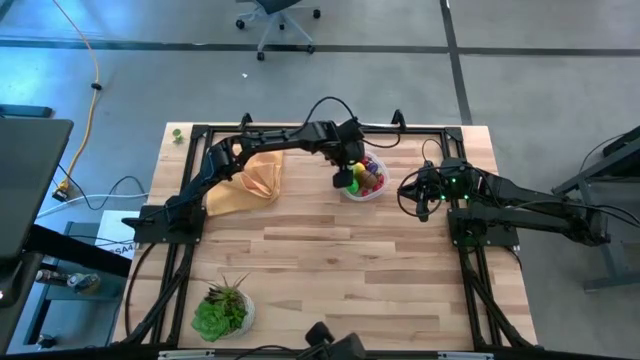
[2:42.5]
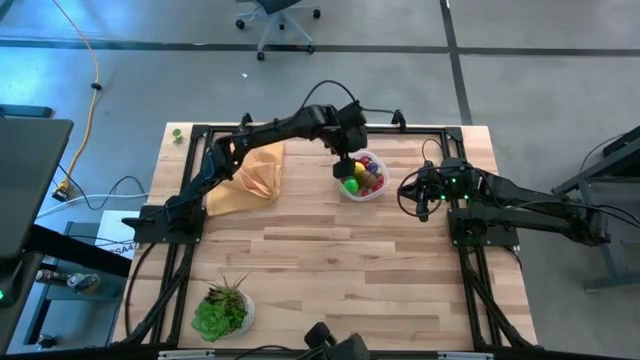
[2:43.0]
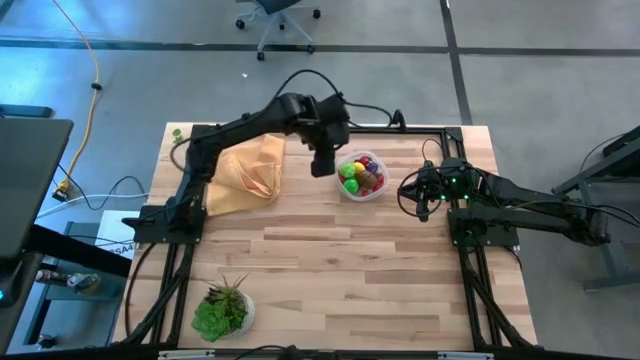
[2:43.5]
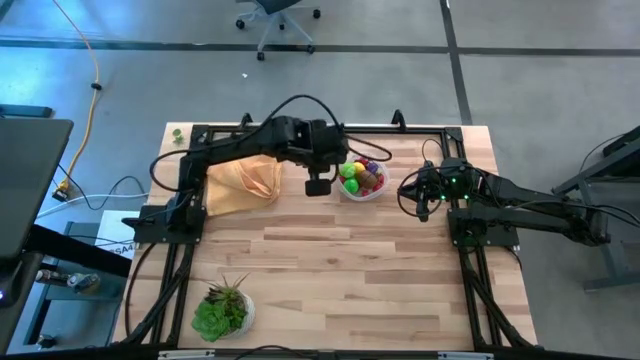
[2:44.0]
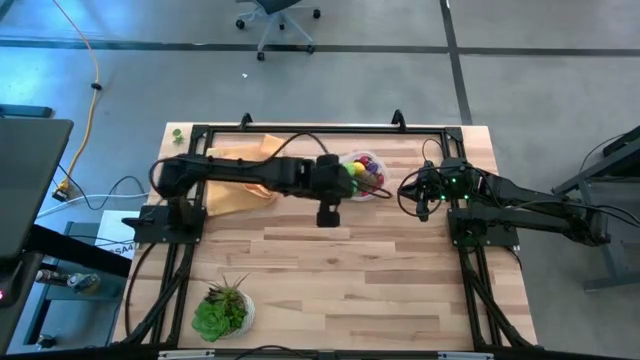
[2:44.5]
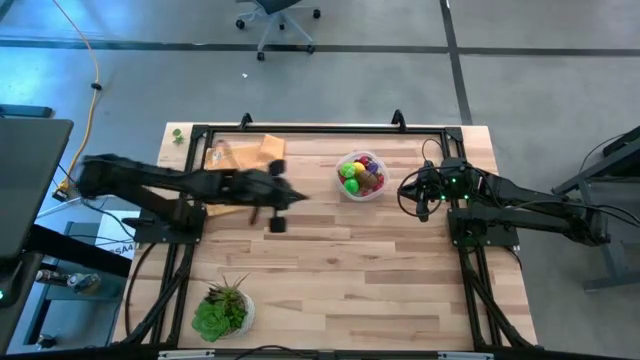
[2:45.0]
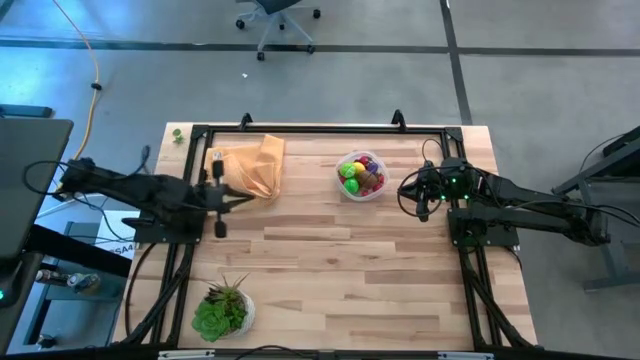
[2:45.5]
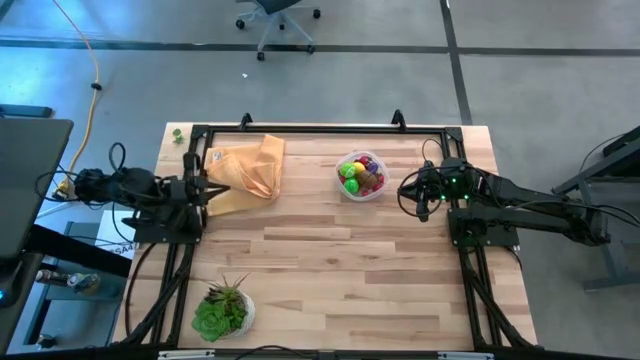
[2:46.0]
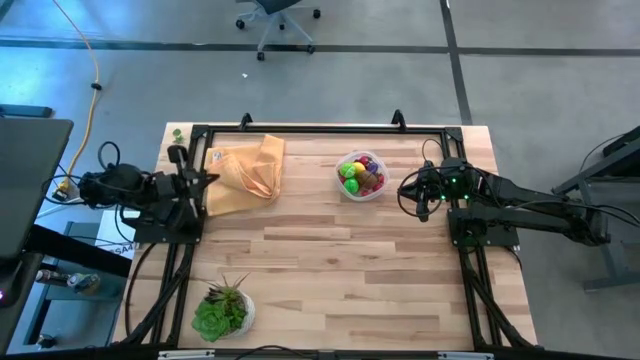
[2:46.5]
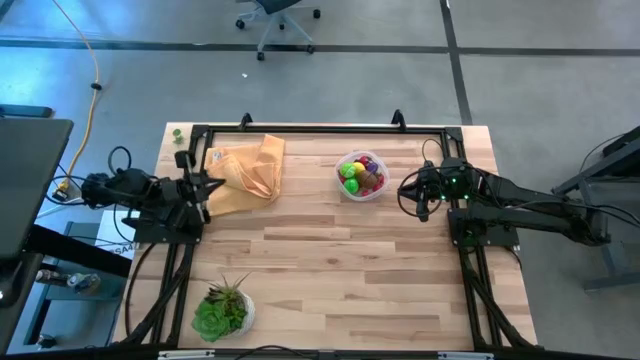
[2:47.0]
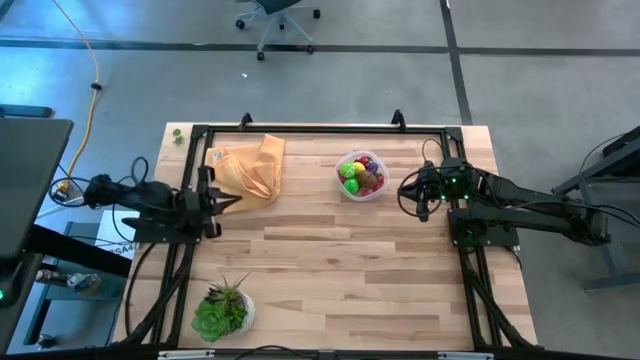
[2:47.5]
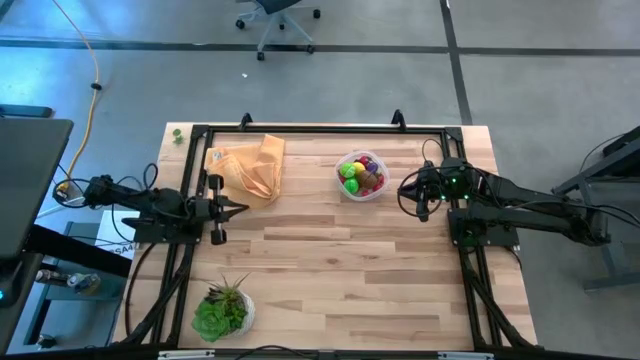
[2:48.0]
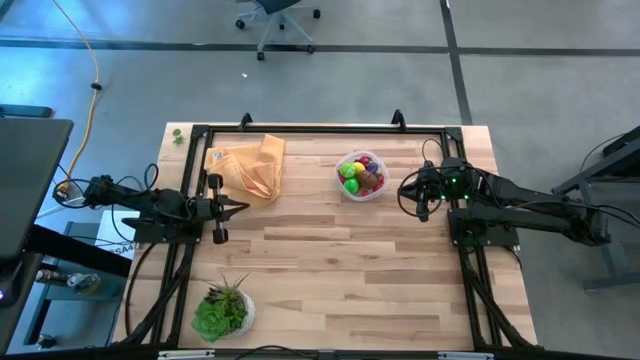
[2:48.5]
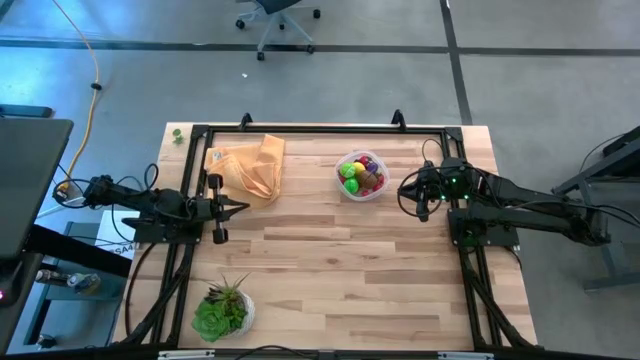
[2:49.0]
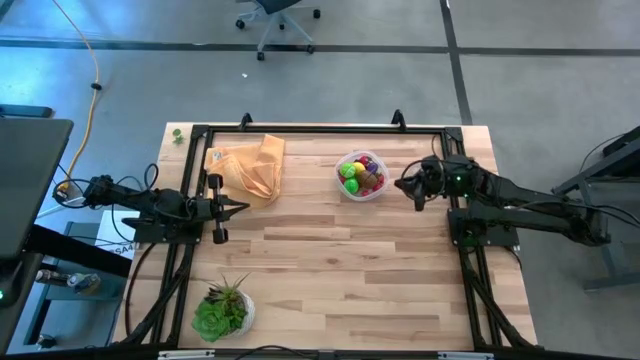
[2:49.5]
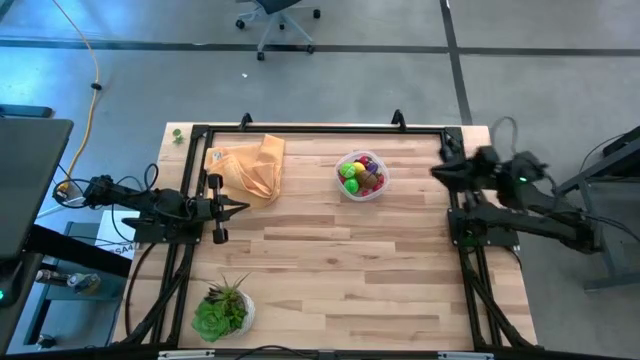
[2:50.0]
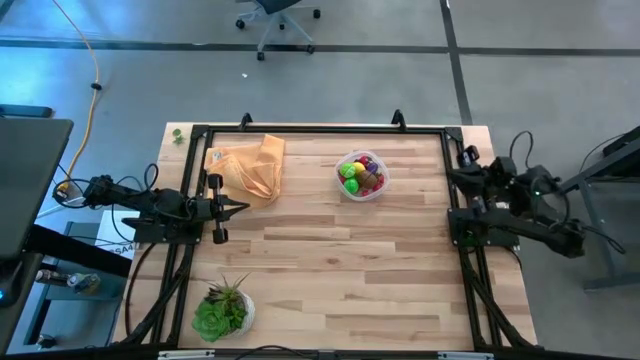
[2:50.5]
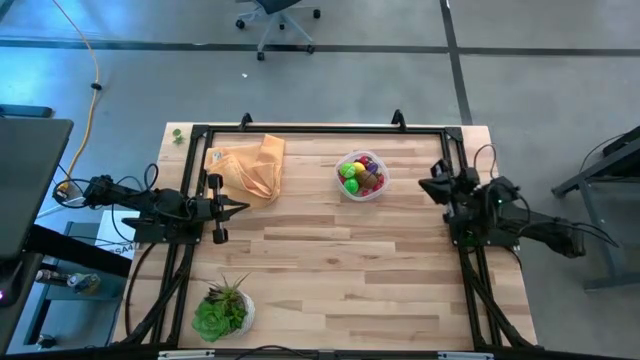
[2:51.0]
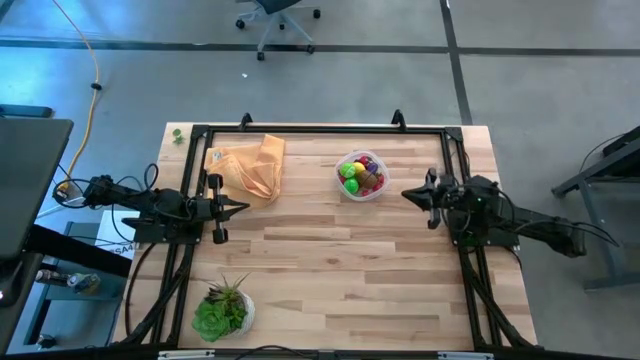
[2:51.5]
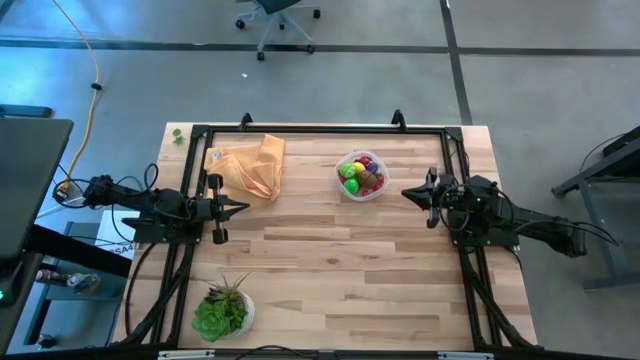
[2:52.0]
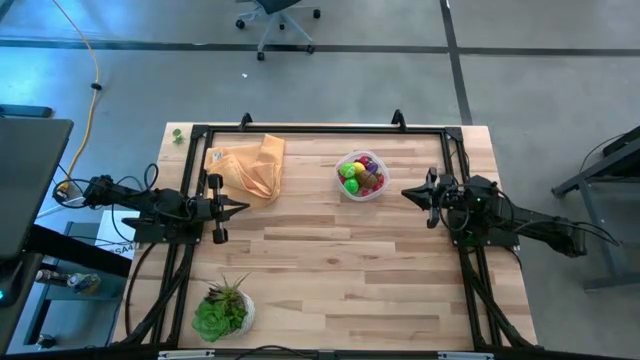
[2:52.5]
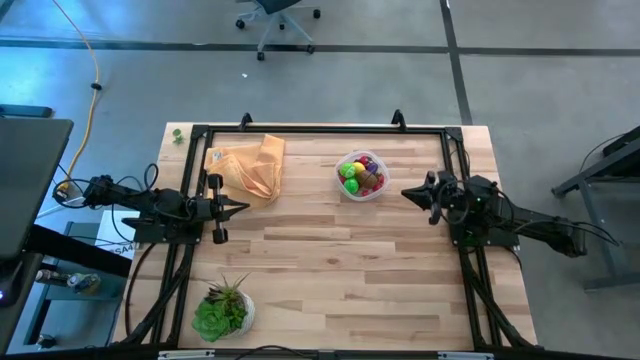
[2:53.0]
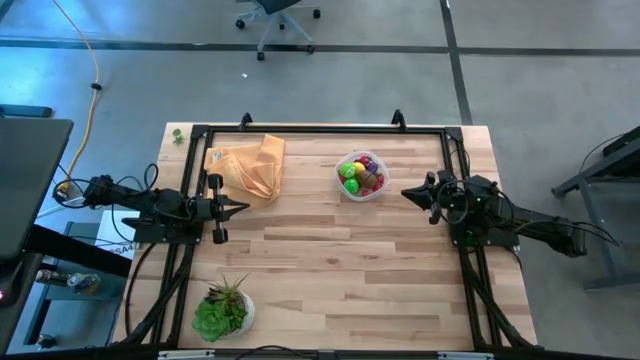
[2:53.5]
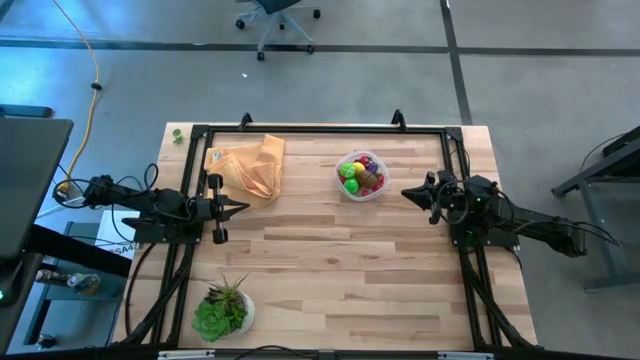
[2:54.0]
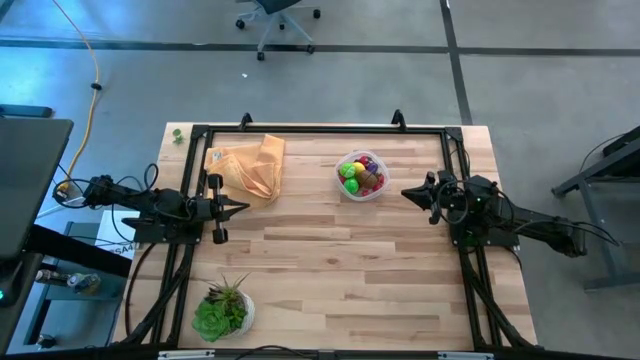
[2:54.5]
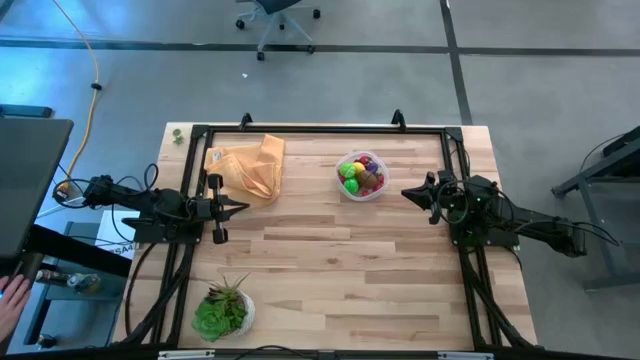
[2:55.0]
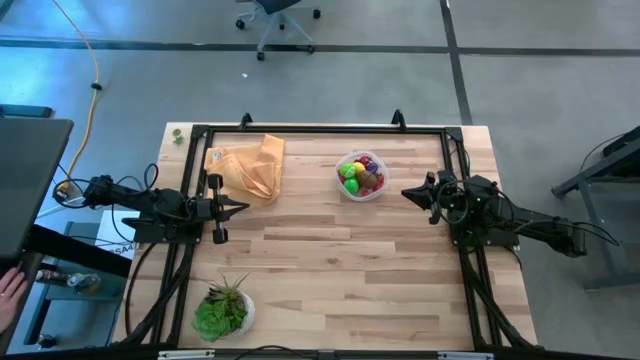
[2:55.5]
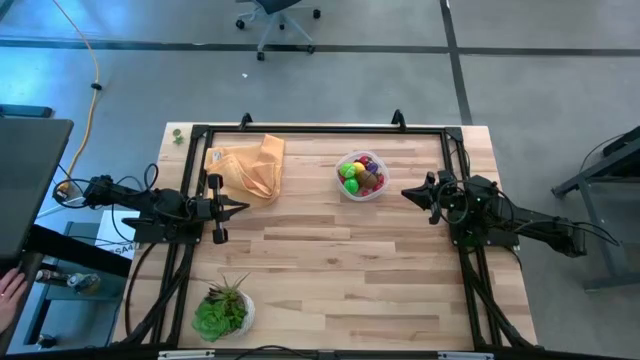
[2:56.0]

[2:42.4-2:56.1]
Task: Pick and placing Produce into tupperware
Return to Home Position

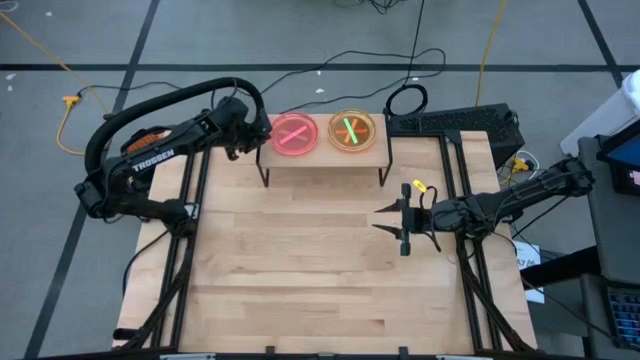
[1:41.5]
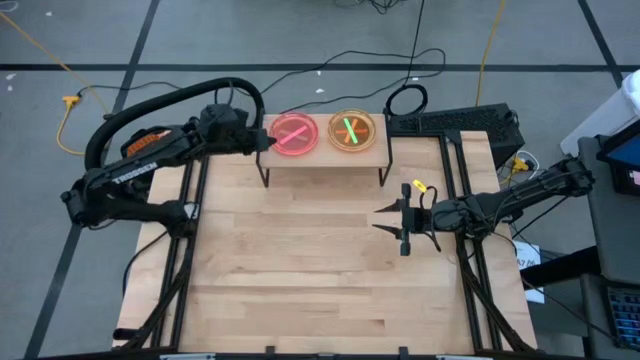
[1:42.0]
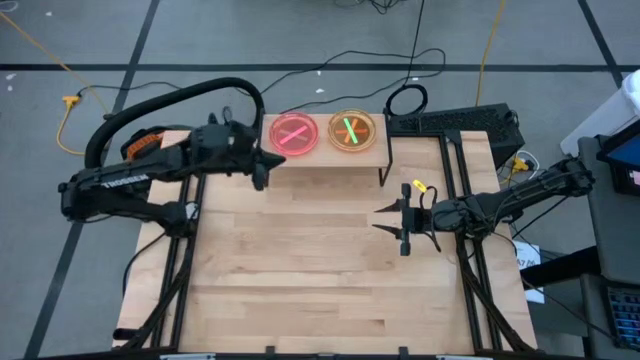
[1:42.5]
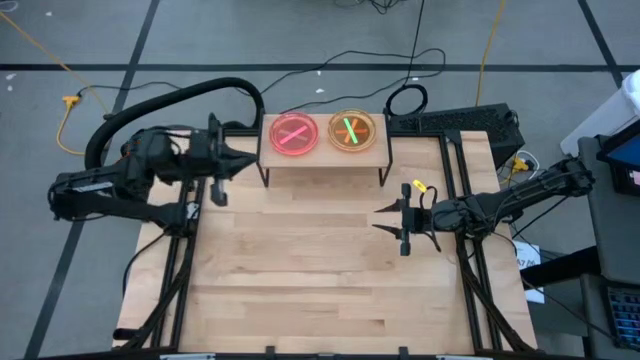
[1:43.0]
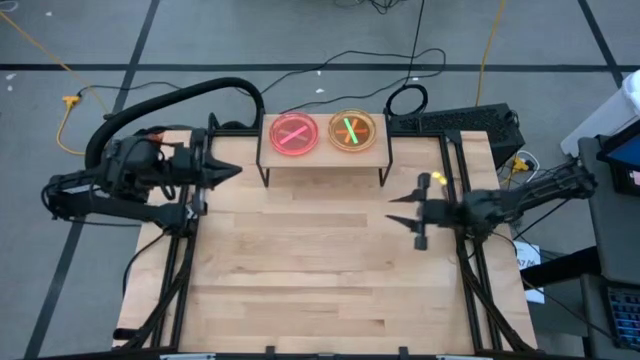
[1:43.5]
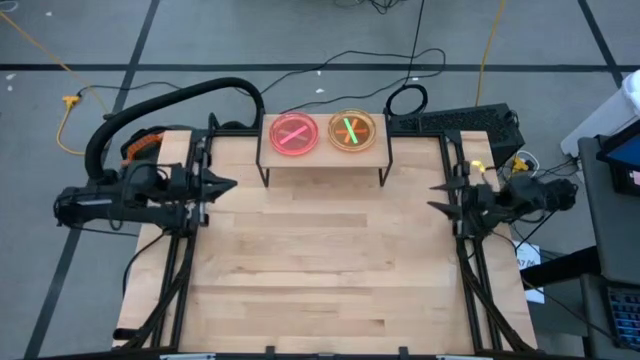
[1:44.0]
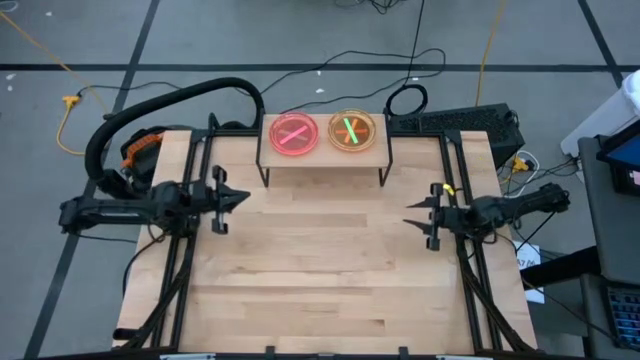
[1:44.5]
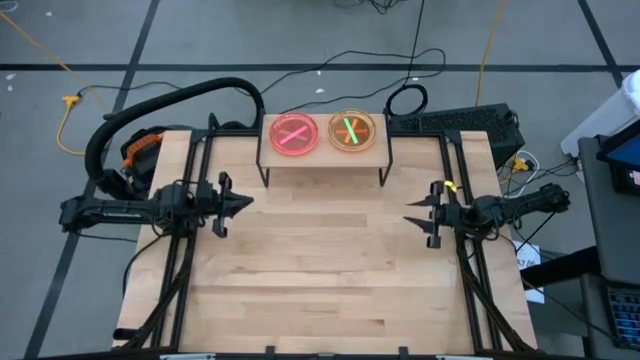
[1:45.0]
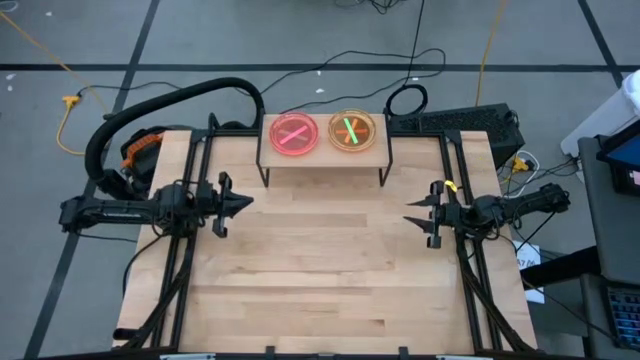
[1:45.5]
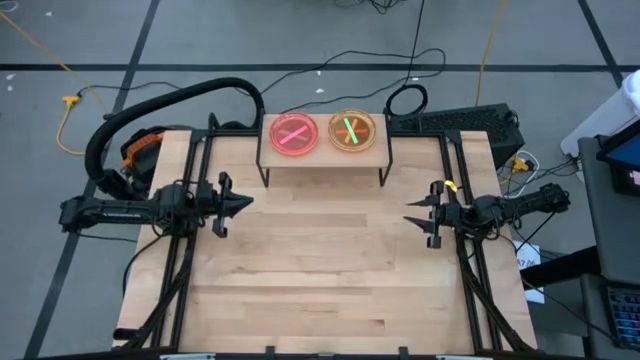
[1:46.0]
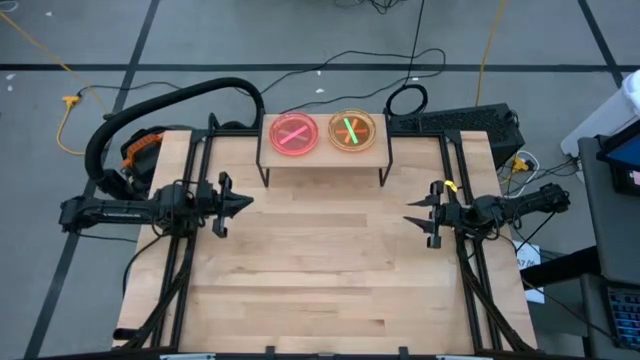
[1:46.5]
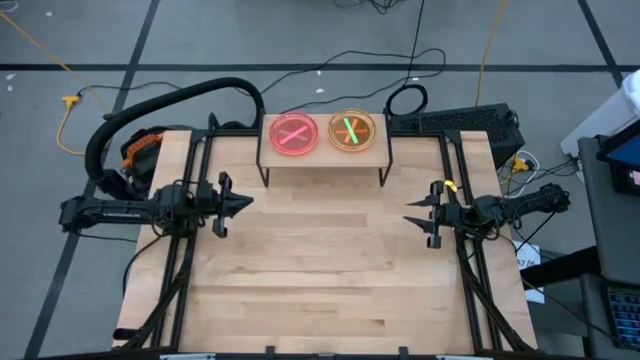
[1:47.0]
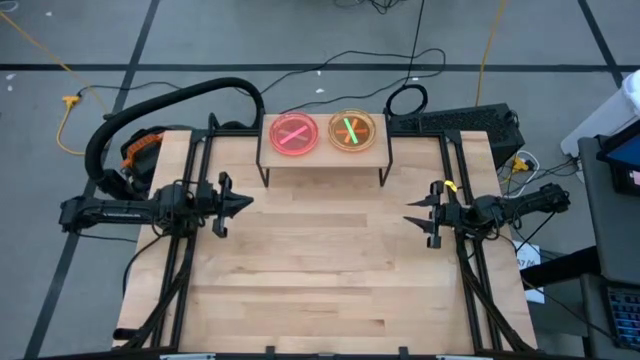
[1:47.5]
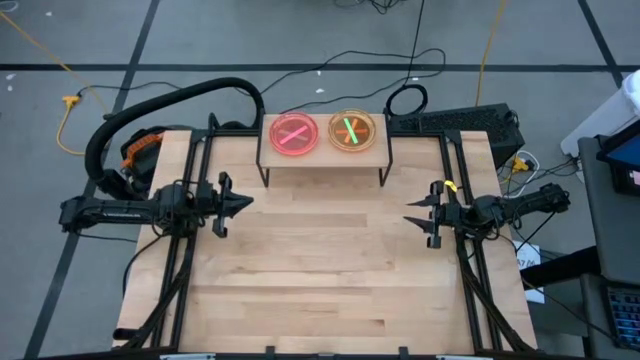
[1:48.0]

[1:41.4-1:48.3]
Task: Place and stack plates onto a shelf
Return To Home Position
